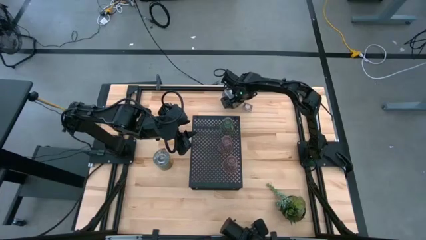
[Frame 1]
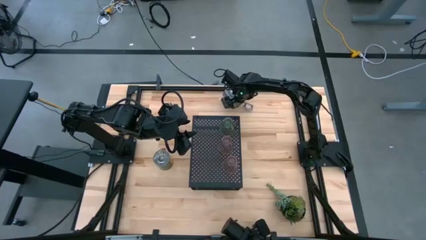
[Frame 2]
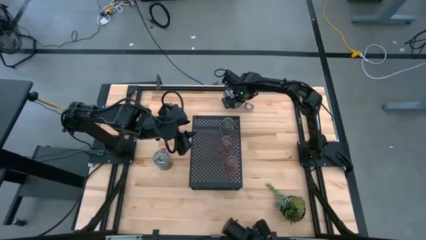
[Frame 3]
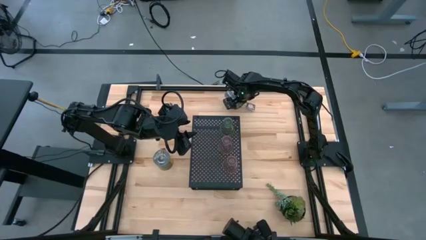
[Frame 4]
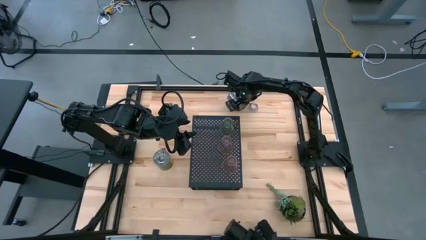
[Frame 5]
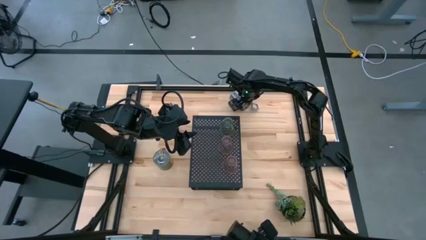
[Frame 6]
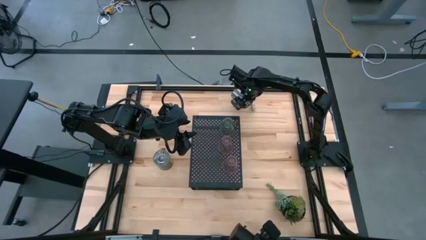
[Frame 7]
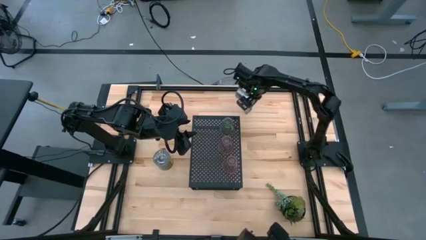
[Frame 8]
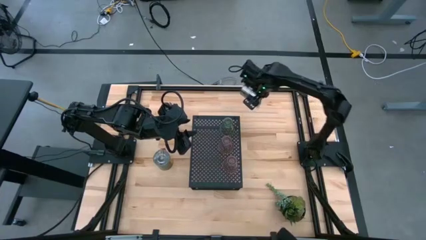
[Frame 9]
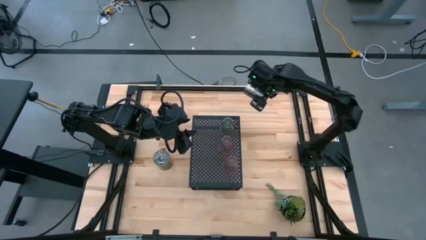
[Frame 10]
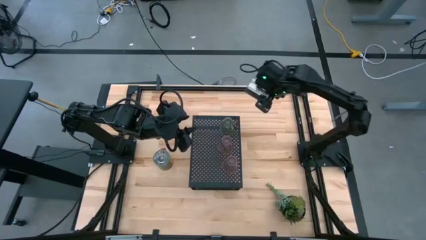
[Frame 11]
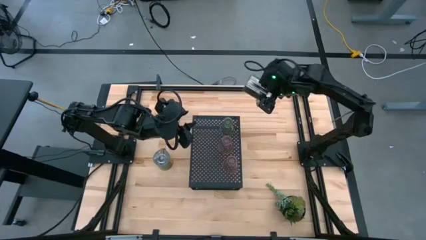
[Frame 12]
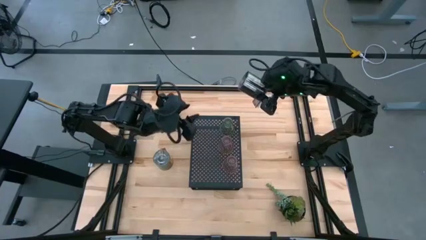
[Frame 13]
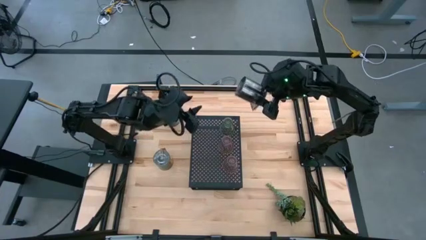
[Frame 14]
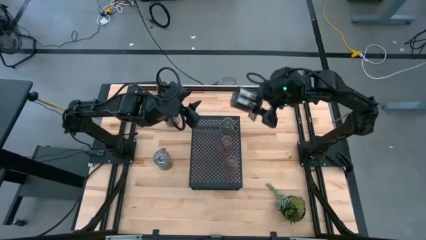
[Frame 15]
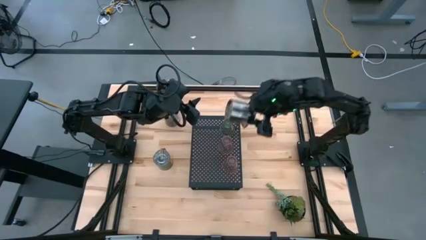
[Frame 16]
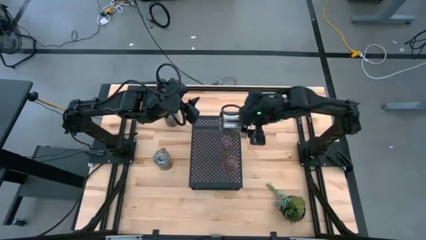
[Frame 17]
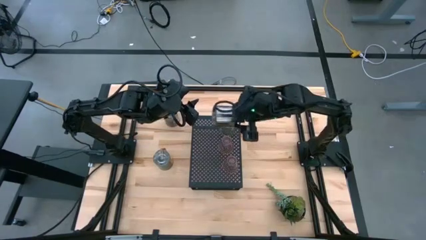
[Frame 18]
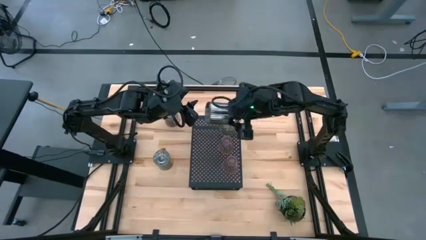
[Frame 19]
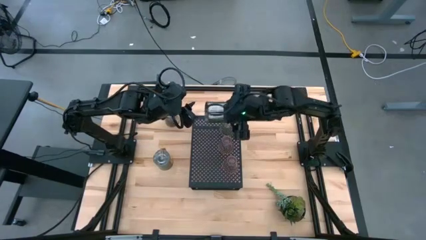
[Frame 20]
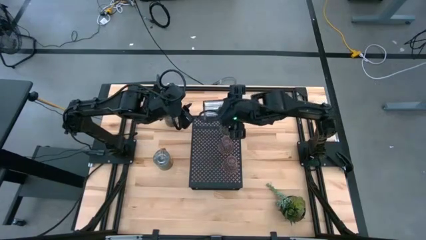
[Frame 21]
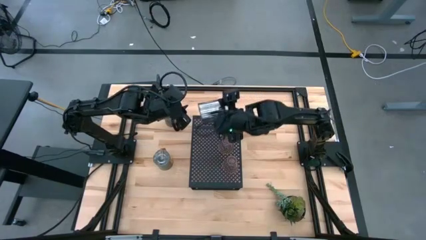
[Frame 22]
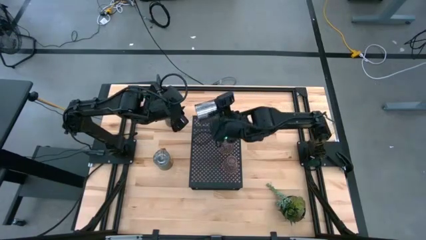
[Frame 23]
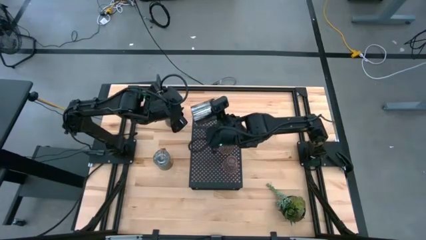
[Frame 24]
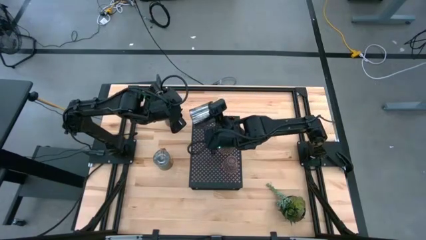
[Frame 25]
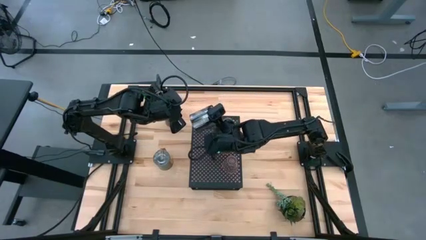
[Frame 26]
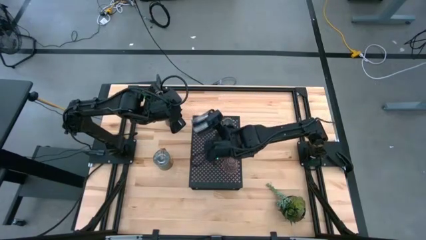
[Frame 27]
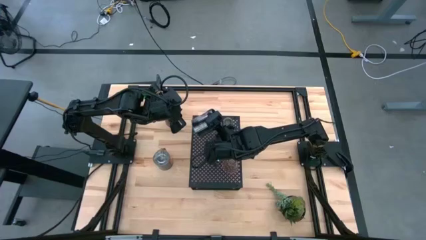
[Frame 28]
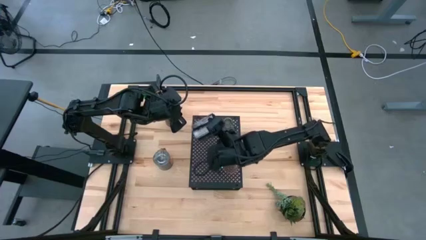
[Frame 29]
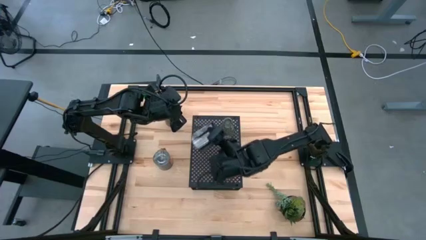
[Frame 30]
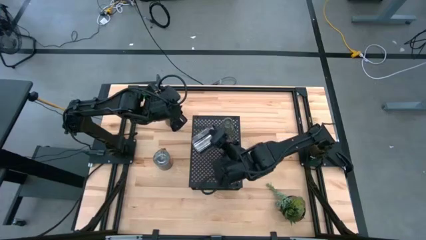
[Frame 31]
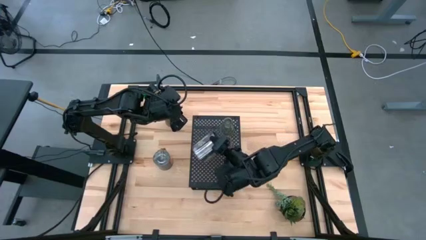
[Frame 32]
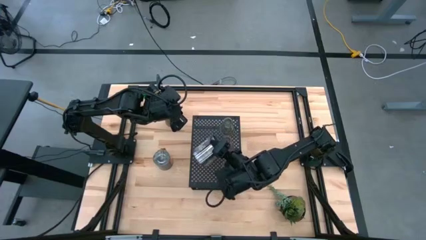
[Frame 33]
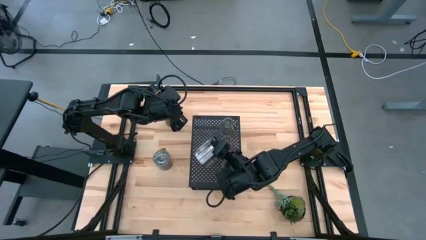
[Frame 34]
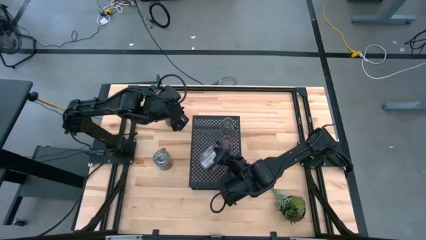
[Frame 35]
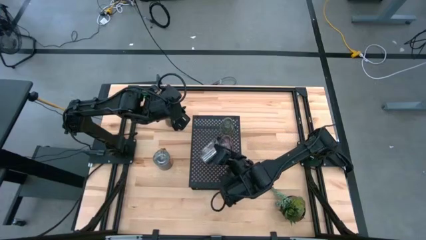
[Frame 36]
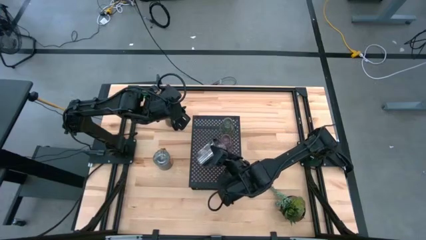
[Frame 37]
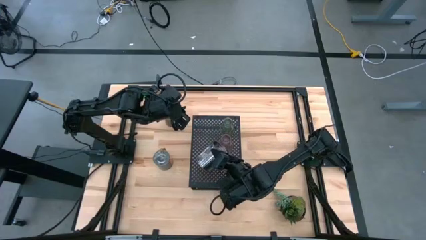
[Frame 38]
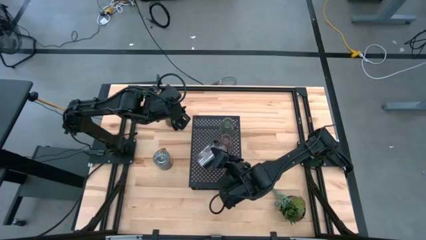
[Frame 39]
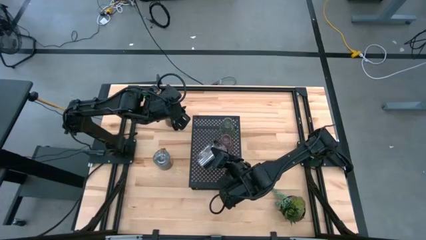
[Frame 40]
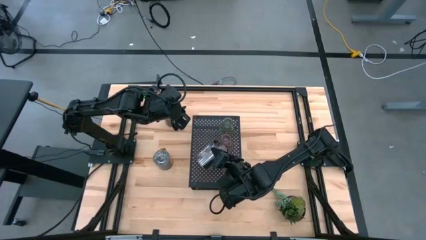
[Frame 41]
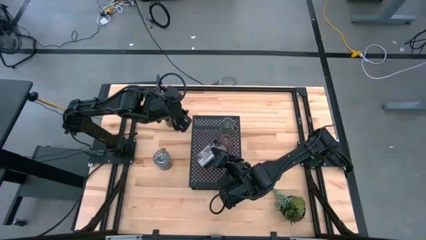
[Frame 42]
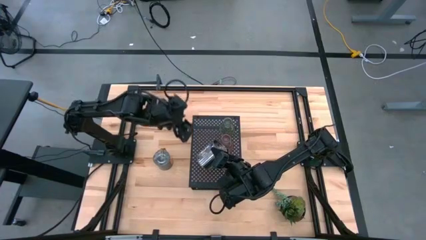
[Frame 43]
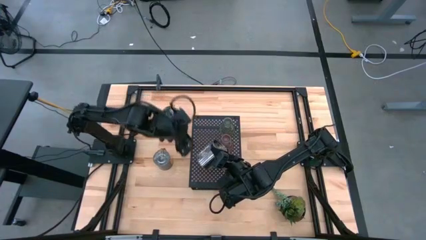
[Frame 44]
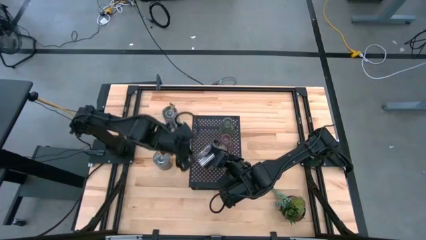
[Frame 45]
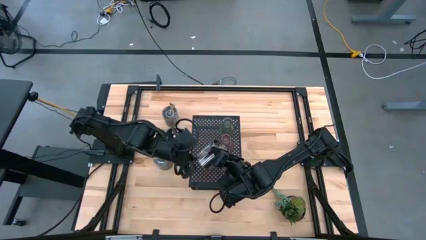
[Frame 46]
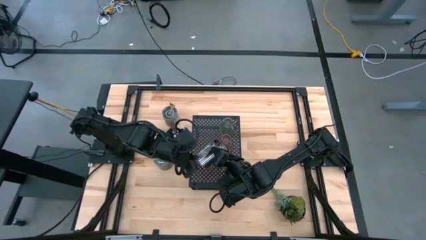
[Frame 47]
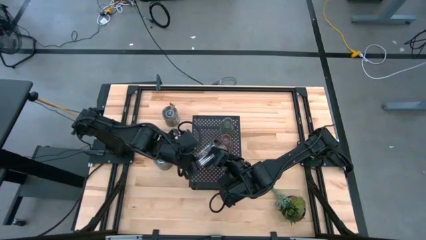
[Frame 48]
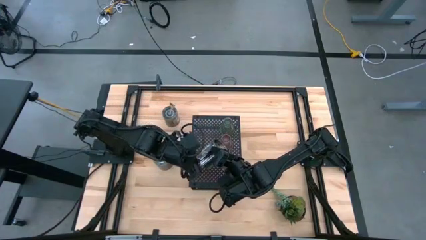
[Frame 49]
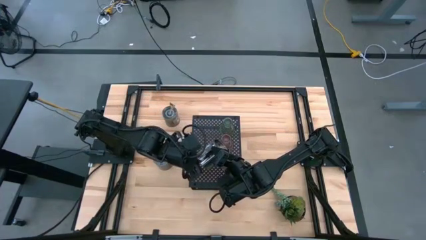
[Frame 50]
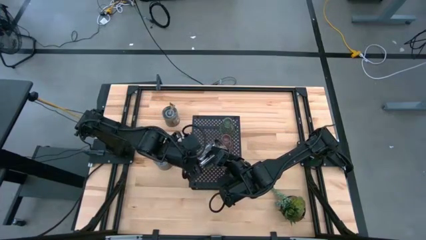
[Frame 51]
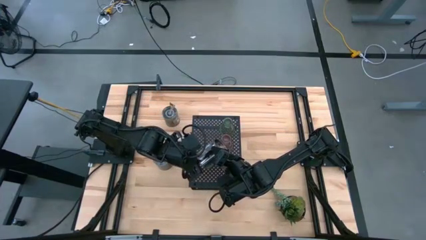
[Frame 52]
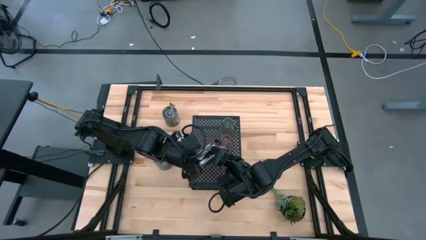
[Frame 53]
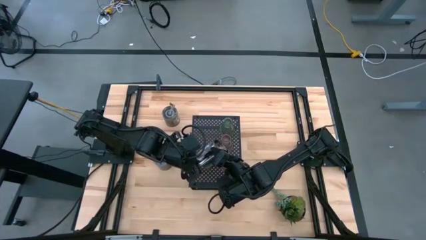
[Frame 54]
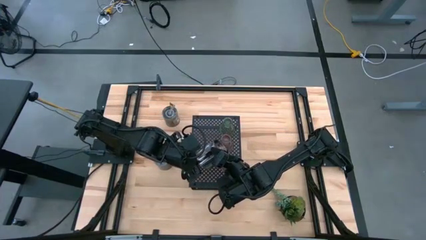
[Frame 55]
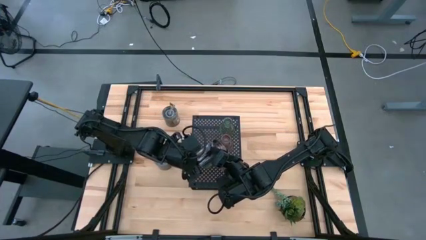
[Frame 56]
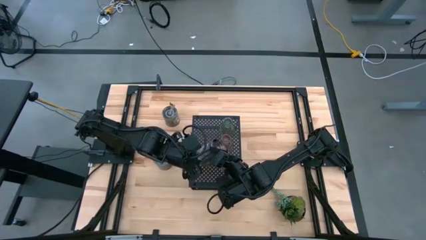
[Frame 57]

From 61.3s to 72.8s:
Task: Pick & Place candle stick holders
Put the top silver scented candle on the shelf

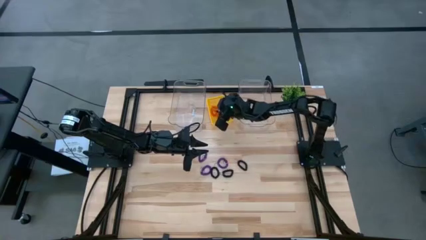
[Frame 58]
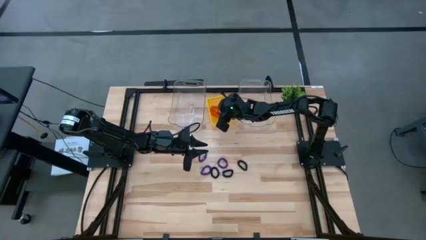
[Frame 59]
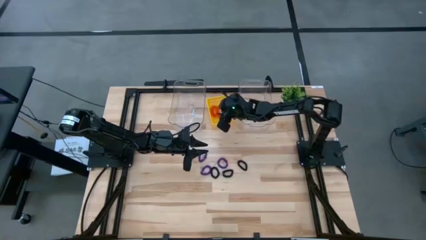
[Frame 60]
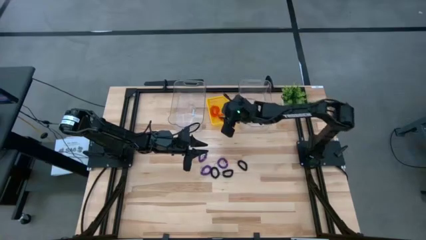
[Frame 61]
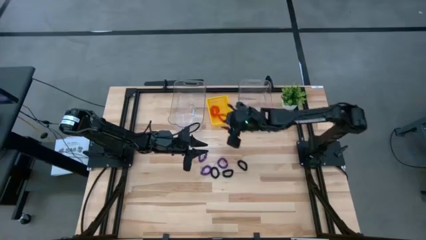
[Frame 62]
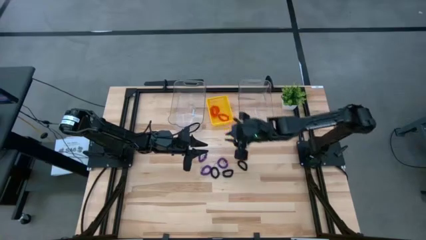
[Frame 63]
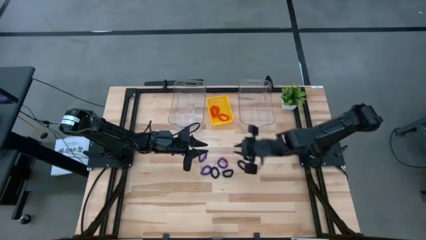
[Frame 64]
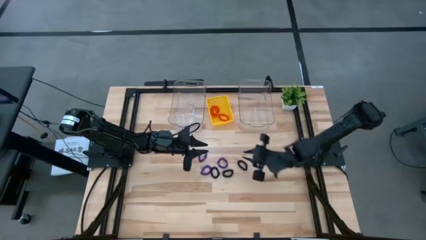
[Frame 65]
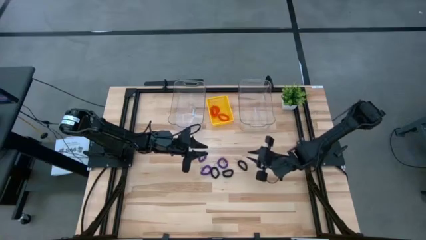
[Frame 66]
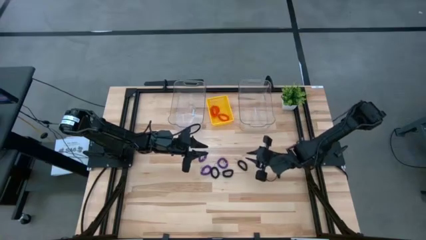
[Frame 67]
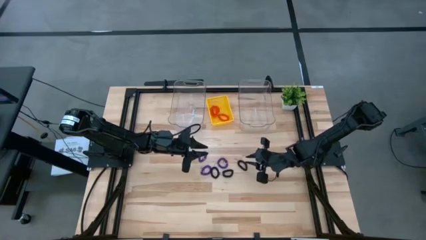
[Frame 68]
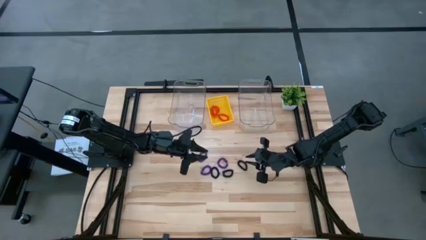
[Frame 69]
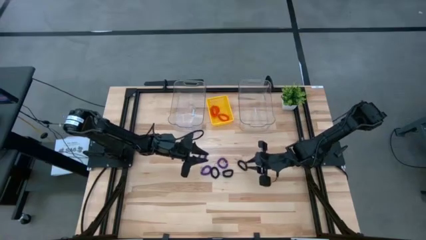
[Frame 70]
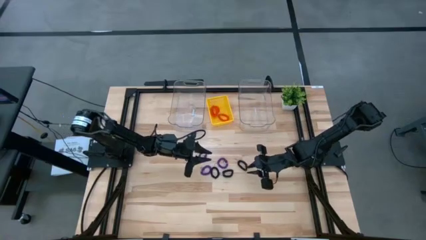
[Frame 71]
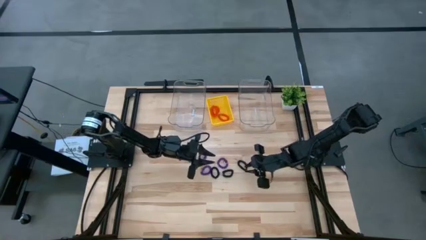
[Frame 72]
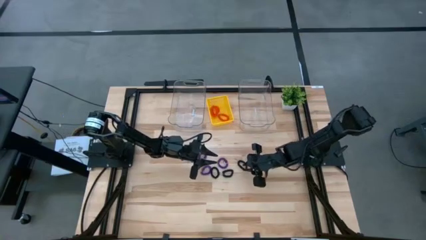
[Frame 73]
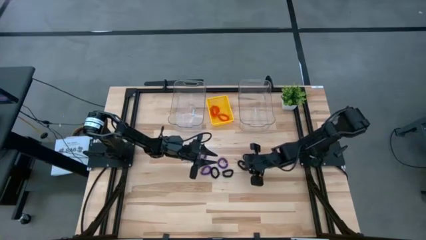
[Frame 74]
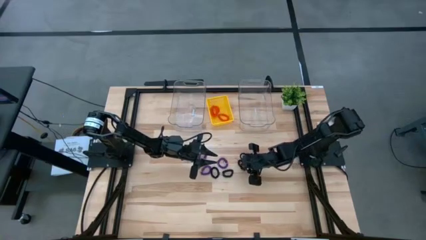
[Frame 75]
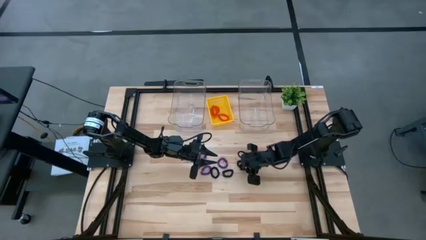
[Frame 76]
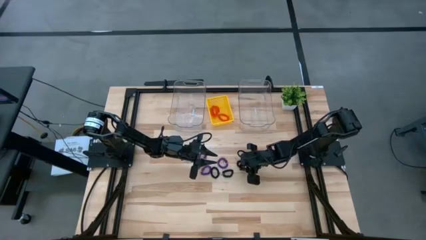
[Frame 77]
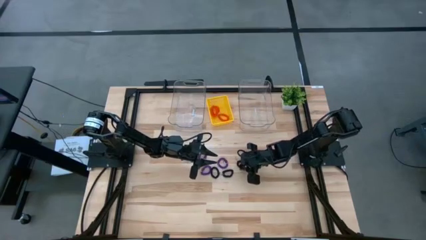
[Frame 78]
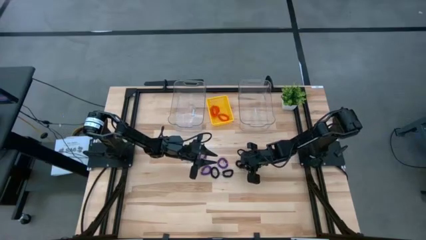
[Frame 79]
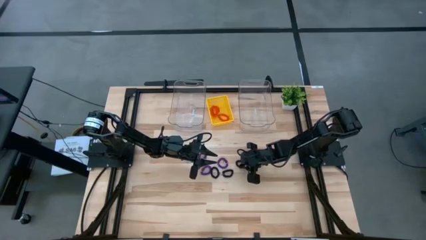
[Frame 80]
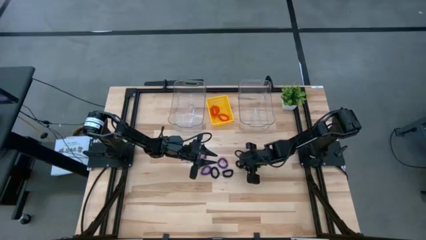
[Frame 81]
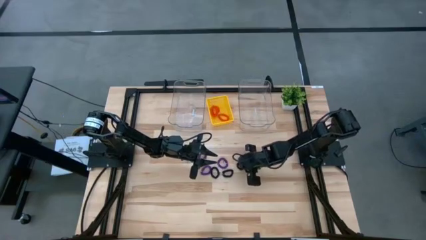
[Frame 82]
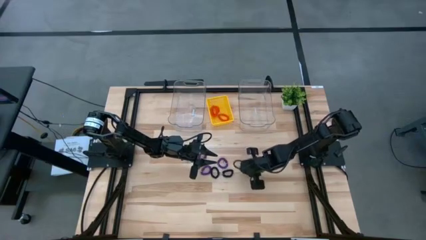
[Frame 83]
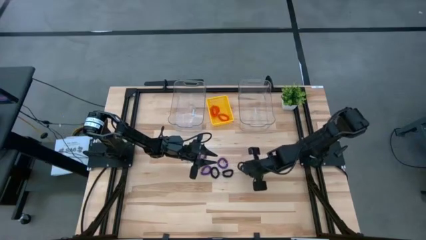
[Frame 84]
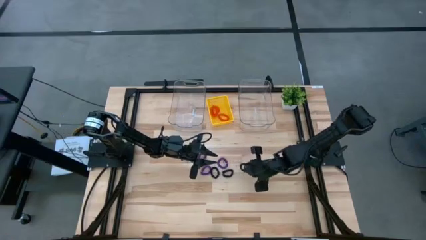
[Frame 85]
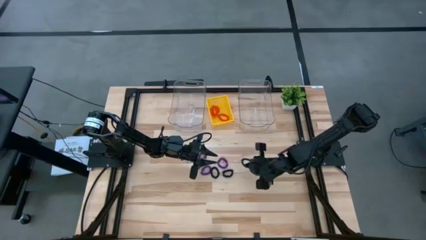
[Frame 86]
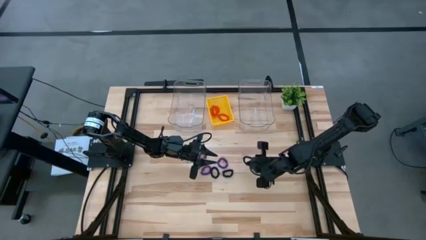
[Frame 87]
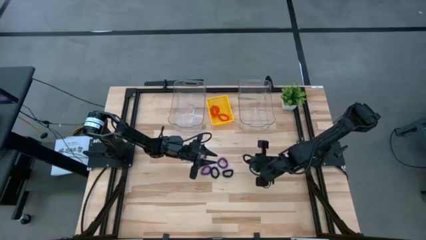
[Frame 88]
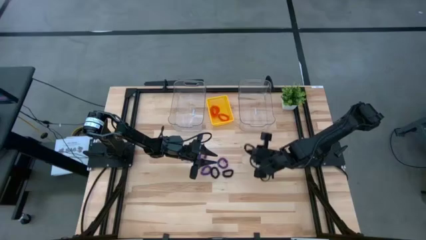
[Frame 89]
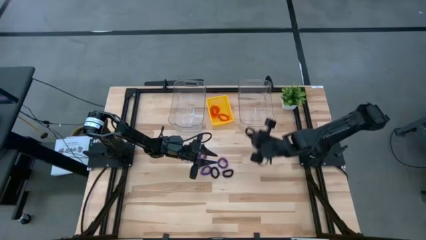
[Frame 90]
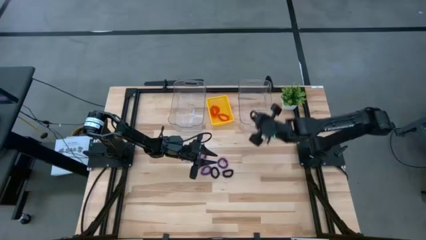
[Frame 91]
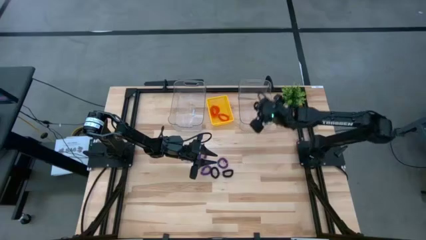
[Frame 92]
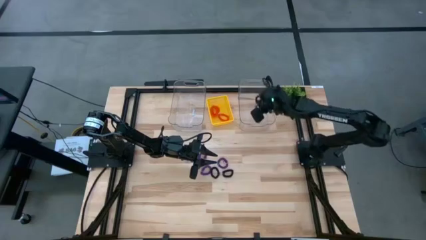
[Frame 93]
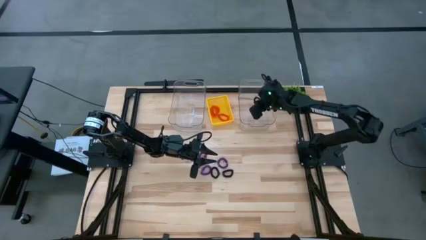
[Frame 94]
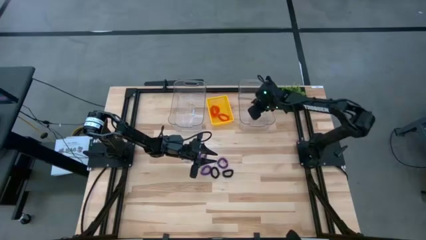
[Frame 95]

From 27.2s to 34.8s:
Task: Sort spring keychains
Put the right black spring keychain into the right transparent bin
